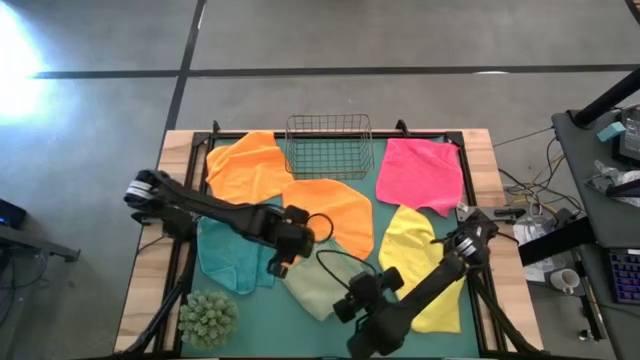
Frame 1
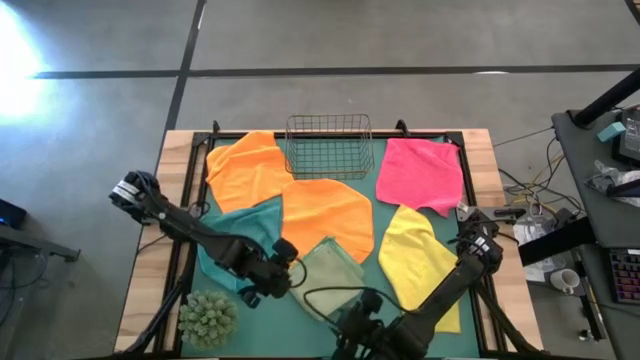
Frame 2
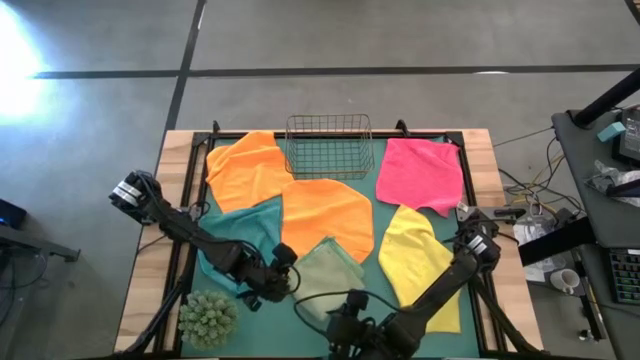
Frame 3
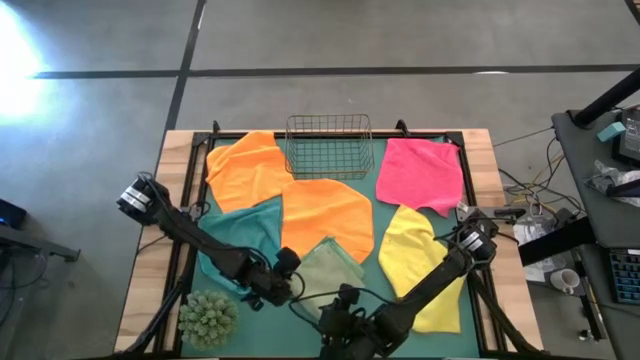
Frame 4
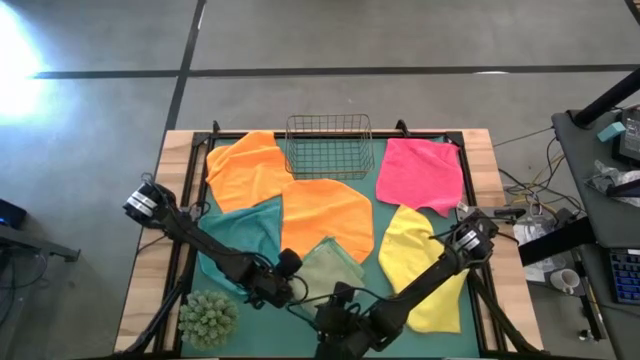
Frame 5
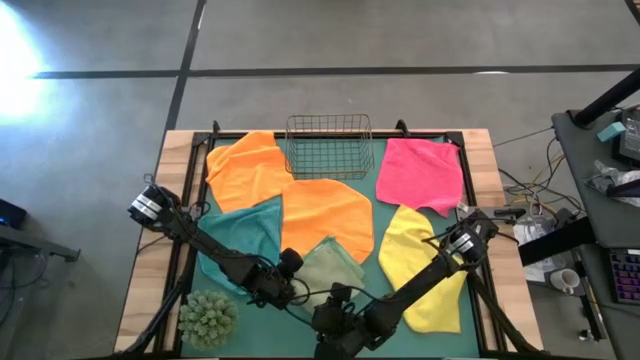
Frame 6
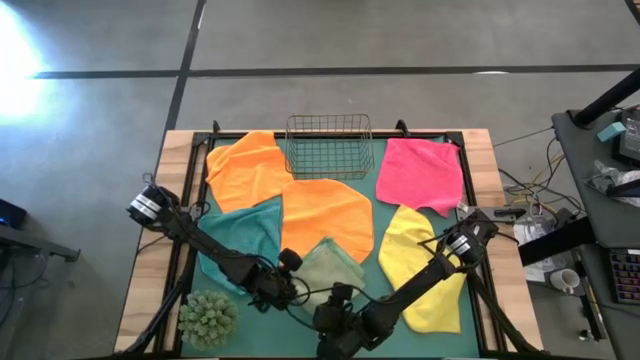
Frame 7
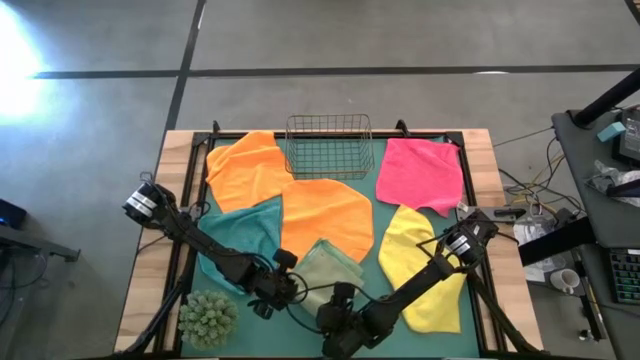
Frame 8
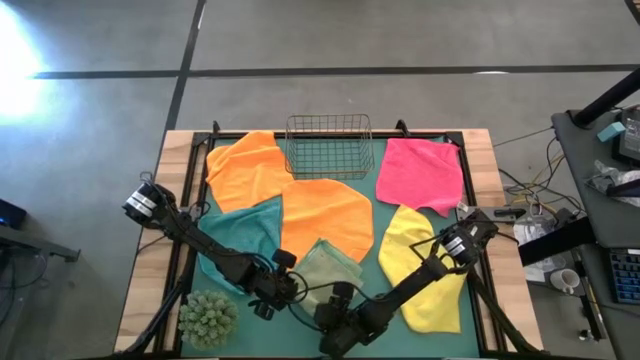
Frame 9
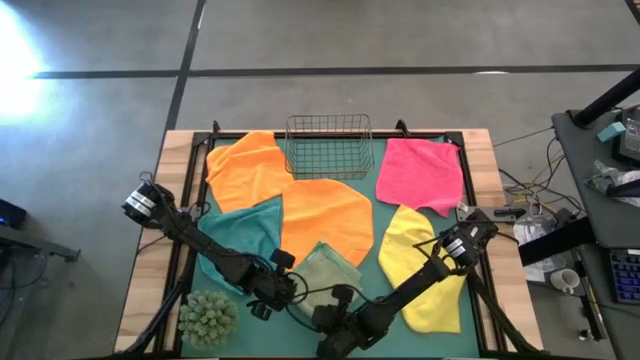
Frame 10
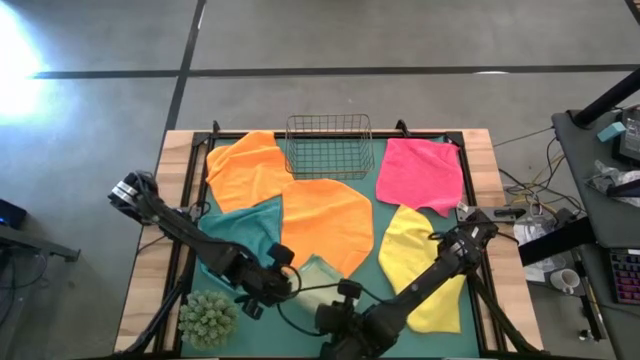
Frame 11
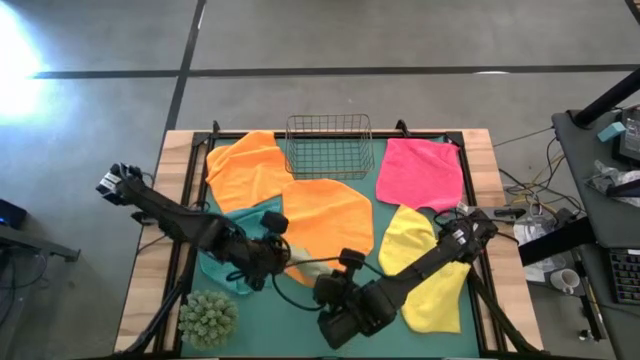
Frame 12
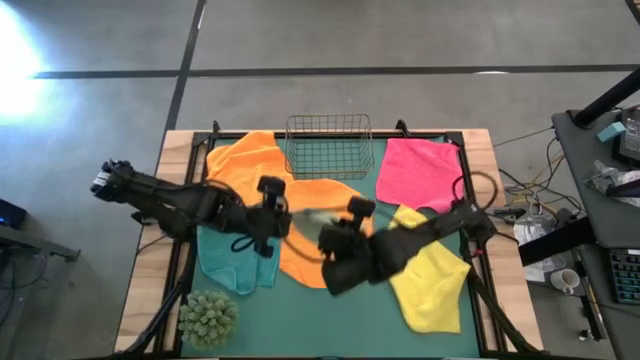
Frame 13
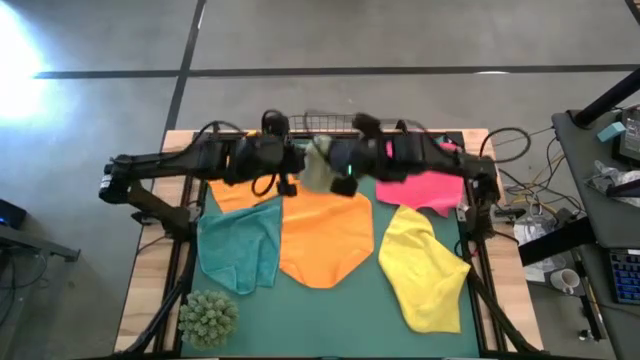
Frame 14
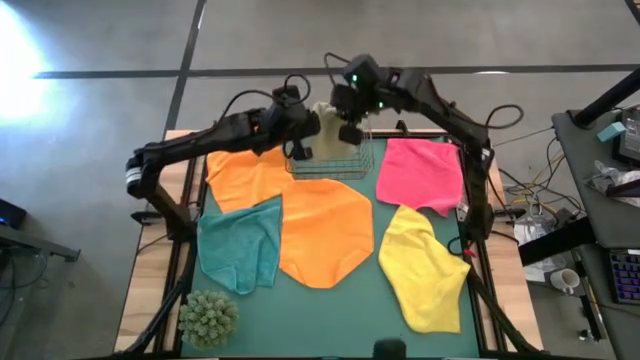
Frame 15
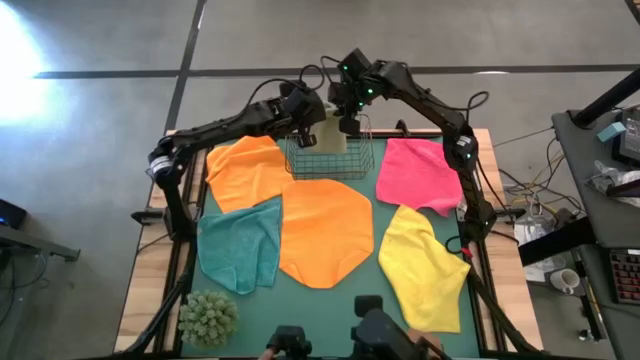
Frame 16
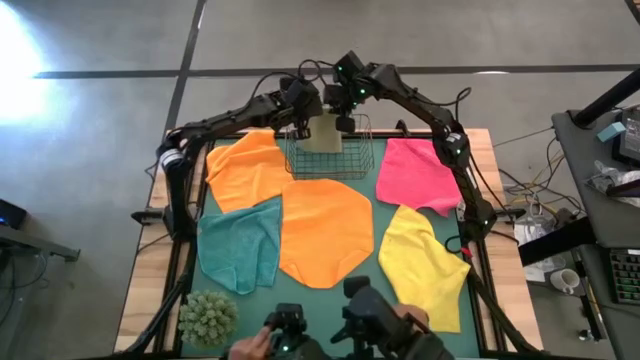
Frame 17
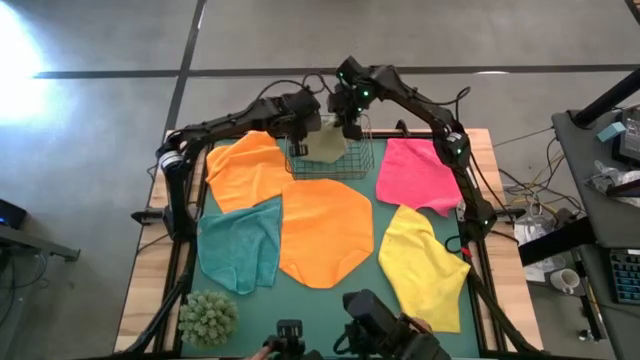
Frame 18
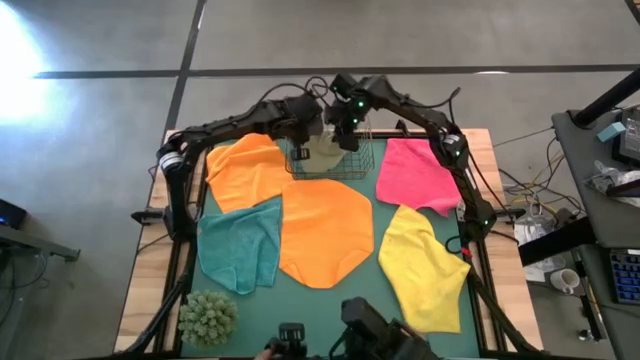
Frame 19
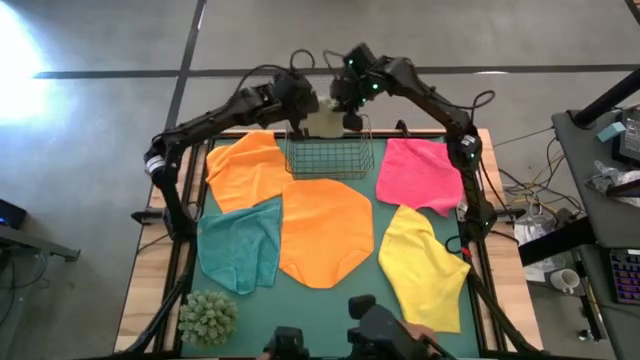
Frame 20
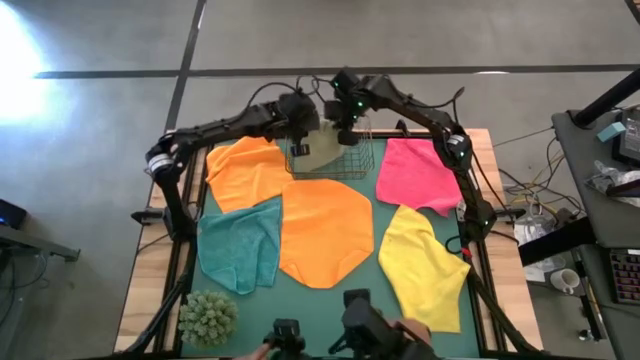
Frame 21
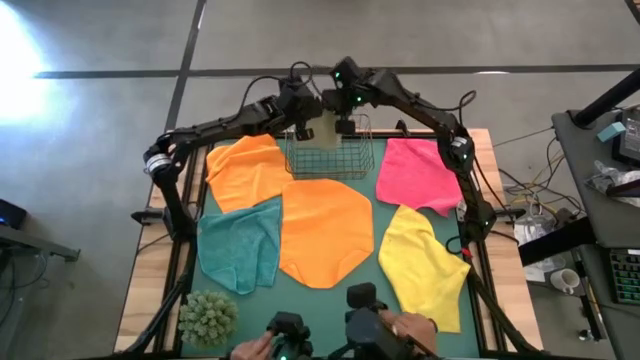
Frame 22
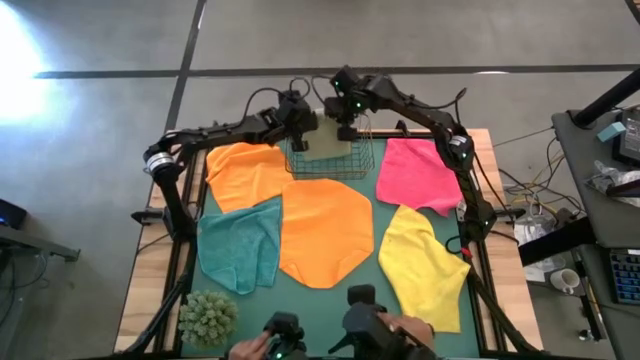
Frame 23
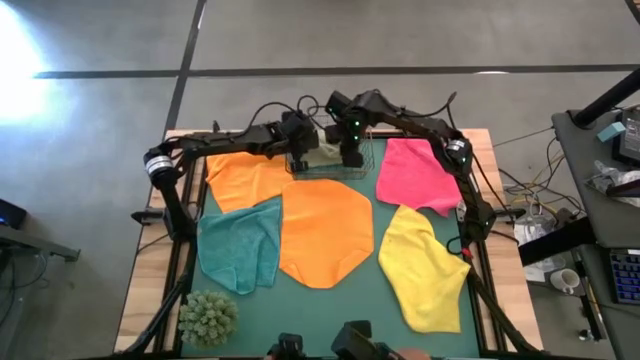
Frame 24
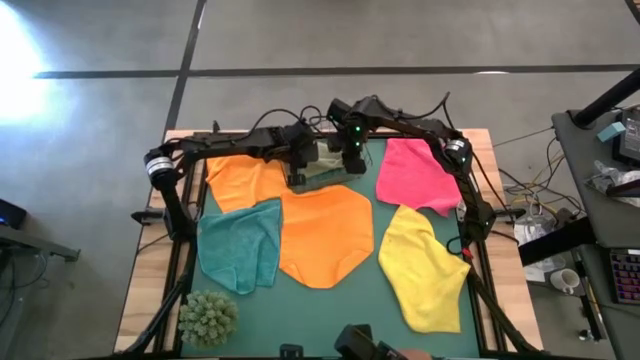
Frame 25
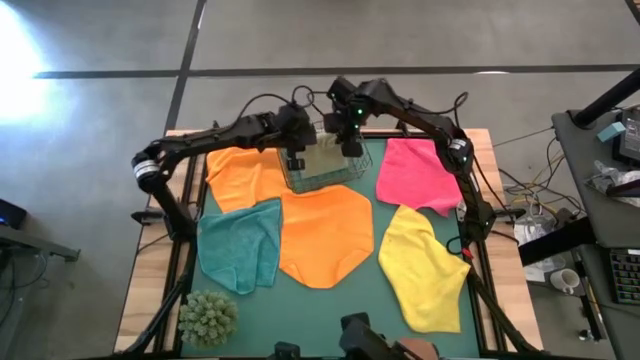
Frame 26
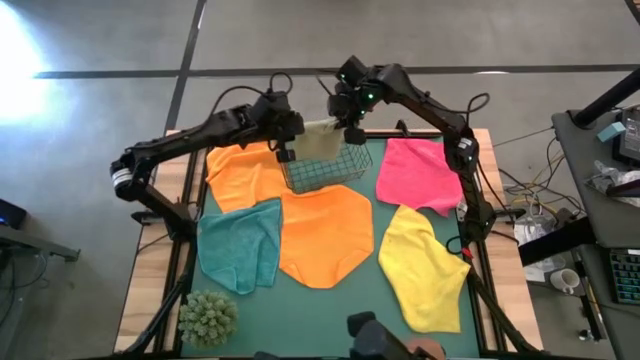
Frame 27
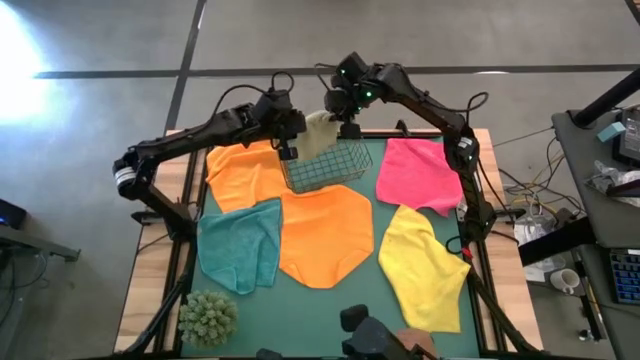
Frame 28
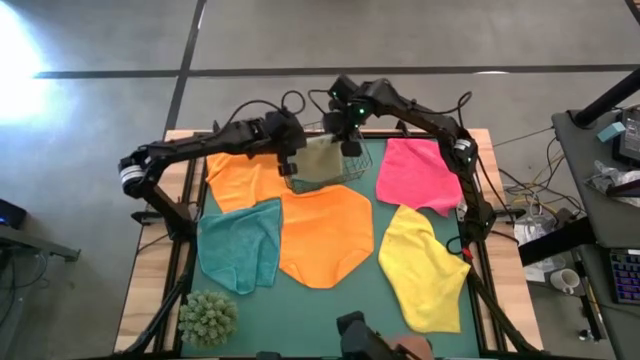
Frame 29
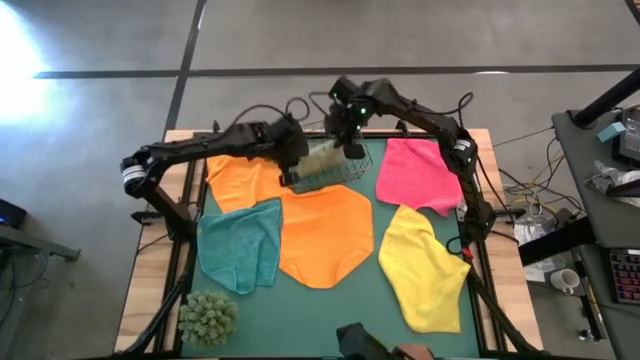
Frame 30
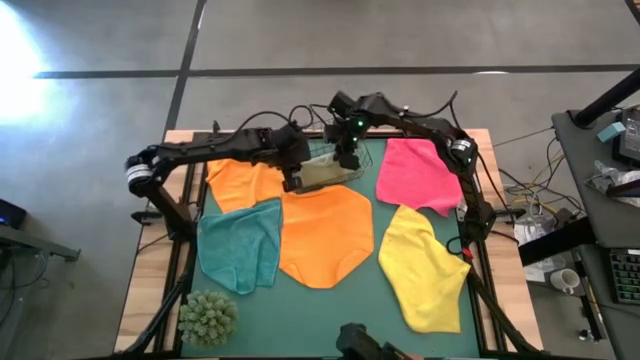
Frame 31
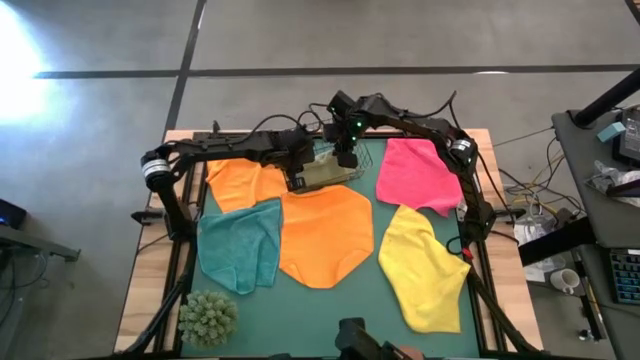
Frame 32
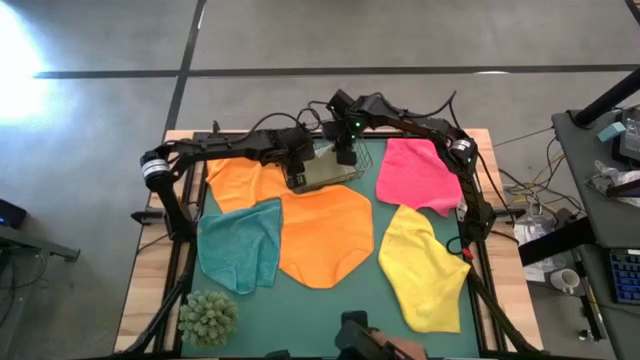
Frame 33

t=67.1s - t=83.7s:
Task: Fold microfiber towels
Put the light green microfiber cloth into the wire basket

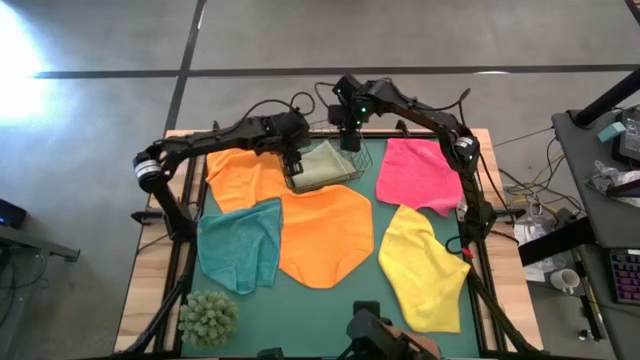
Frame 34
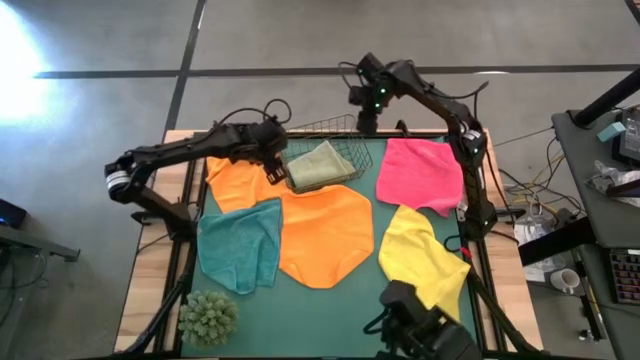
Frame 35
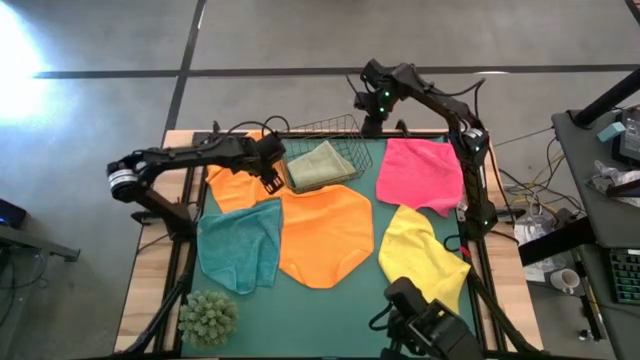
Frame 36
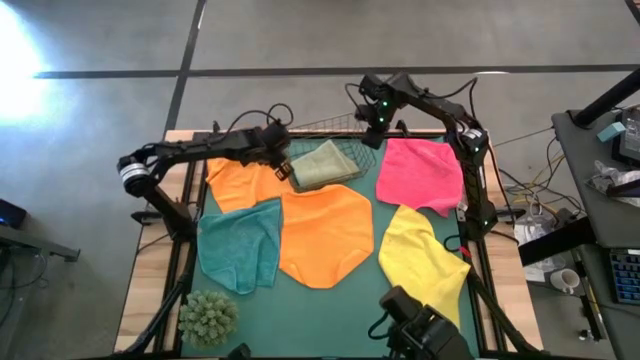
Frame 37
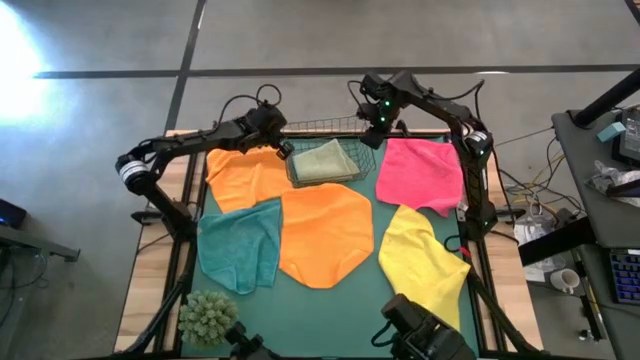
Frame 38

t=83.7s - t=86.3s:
Adjust the wire basket
